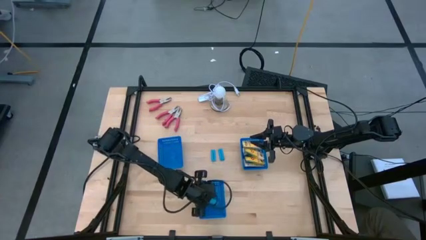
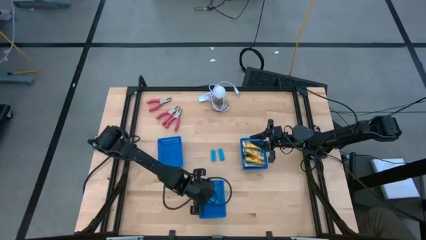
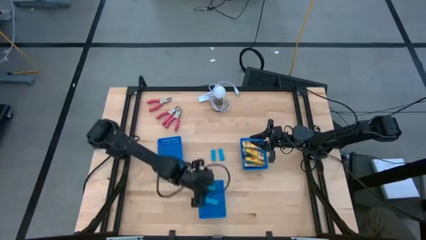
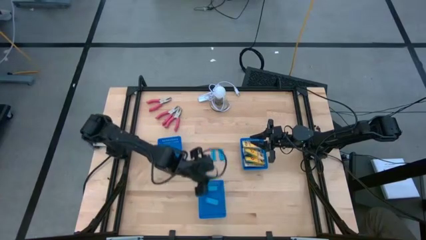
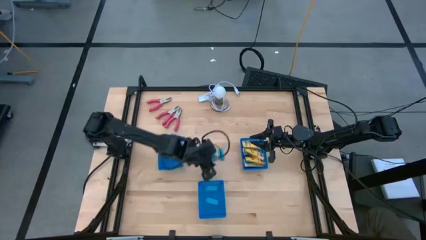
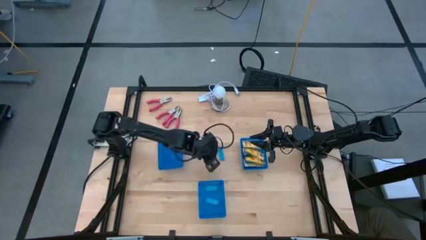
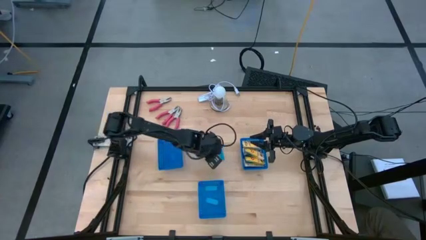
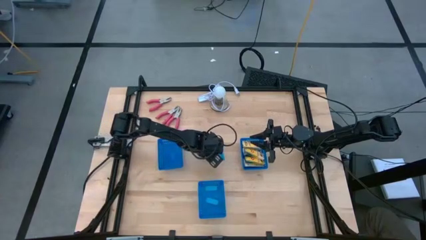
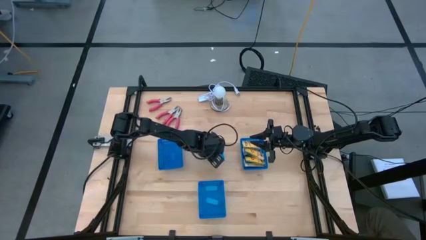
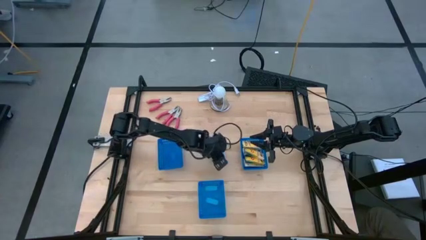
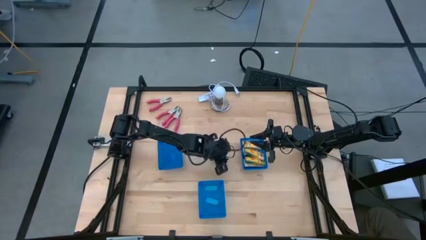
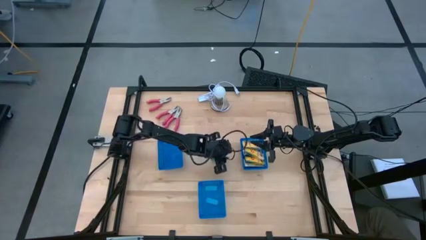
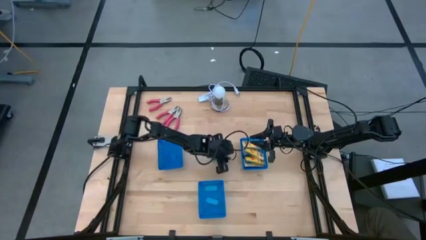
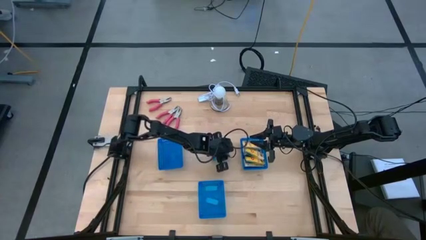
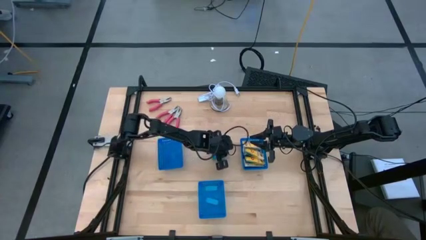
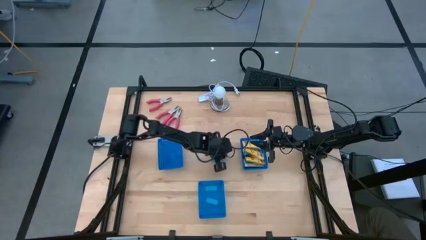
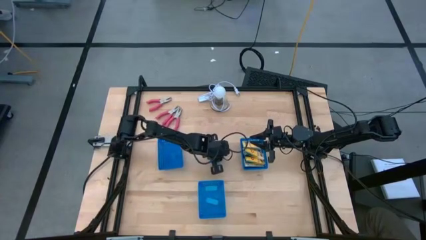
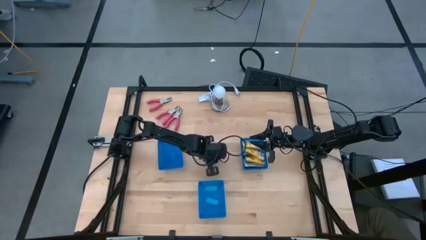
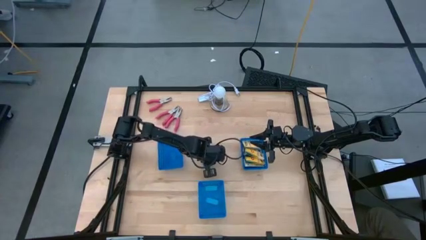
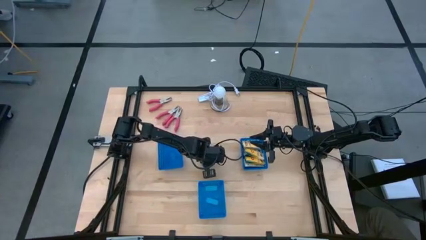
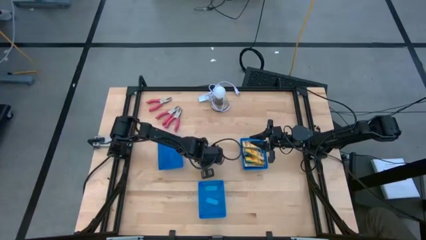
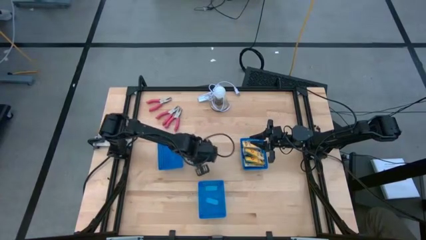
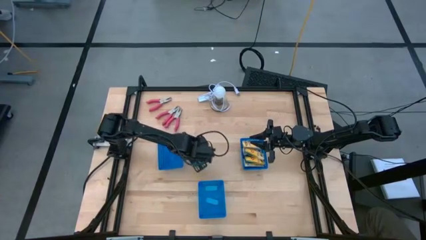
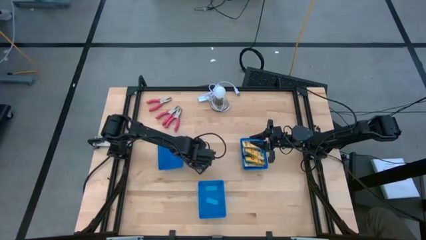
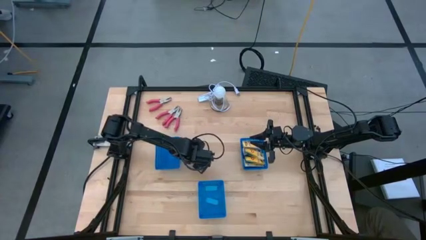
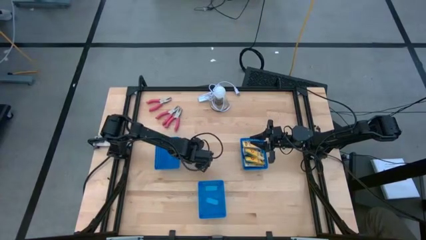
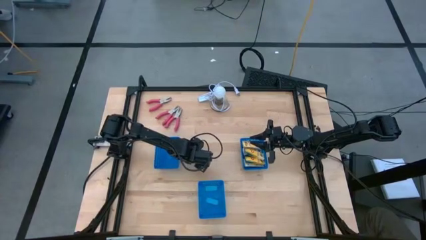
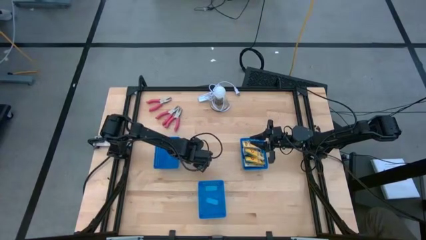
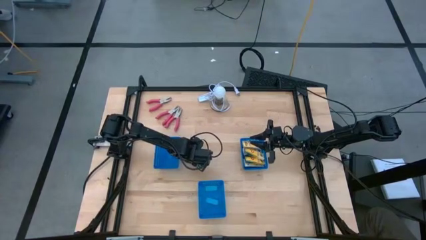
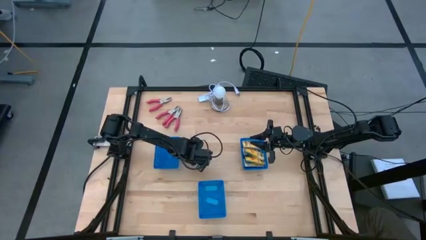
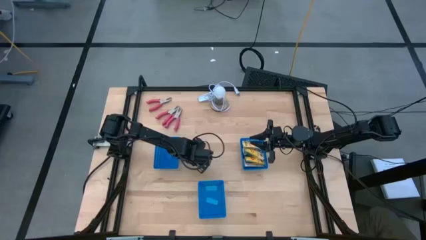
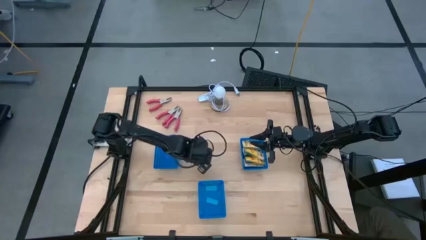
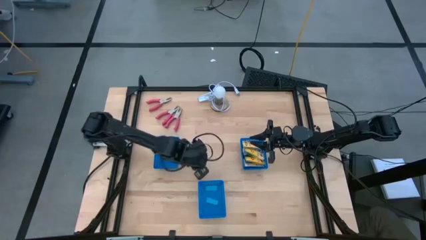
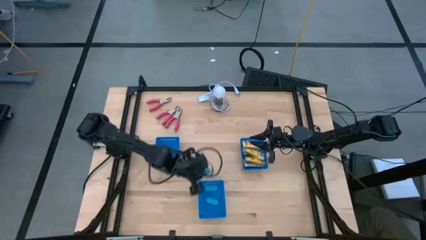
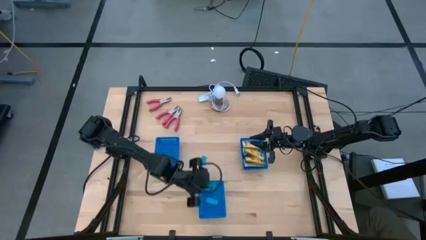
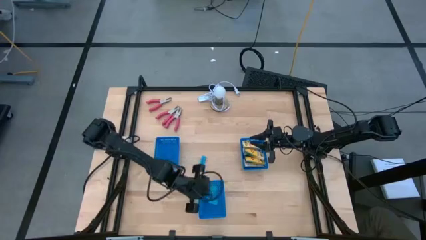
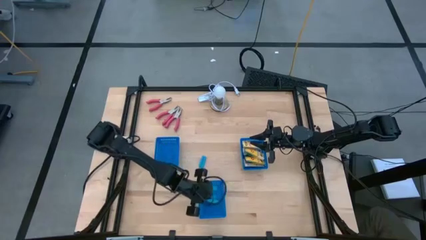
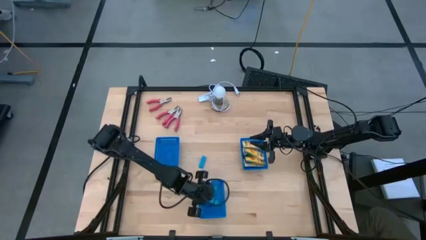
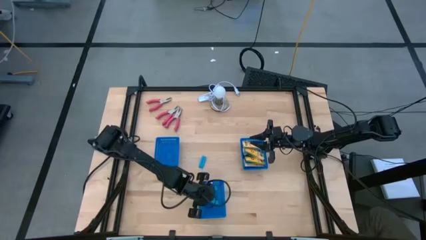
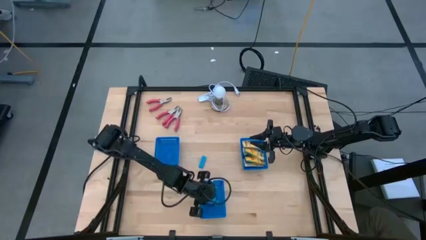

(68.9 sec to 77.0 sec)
Task: Pick & Place School Supplies
Put the blue eraser into the bottom blue bin

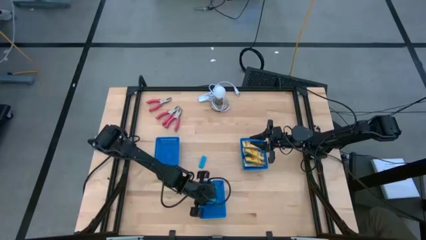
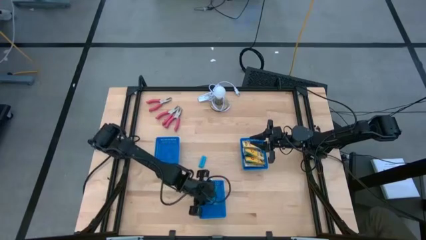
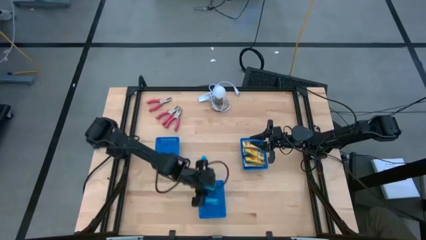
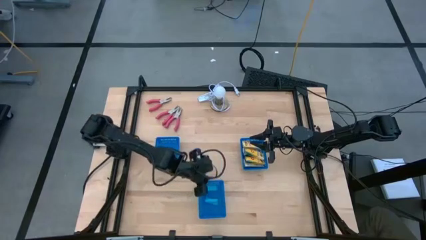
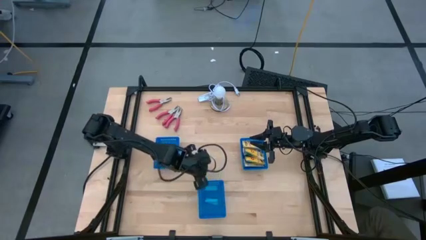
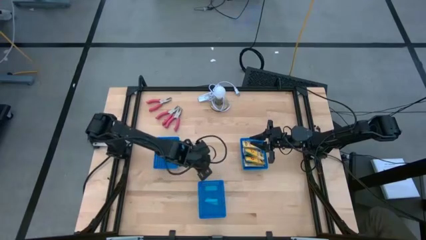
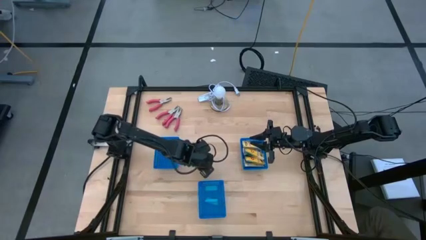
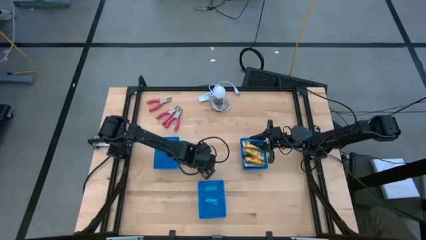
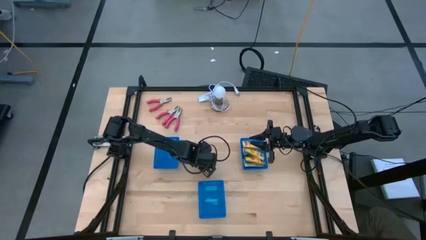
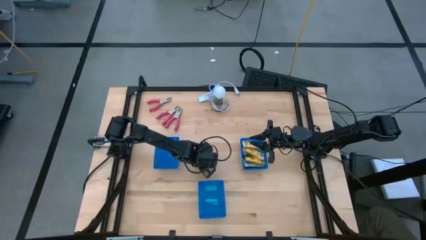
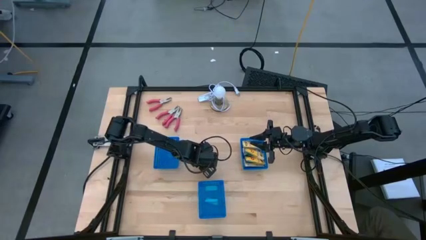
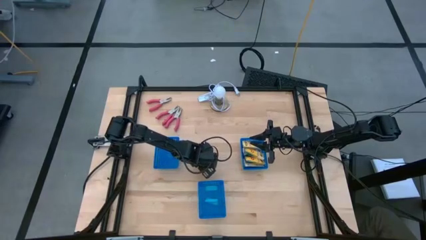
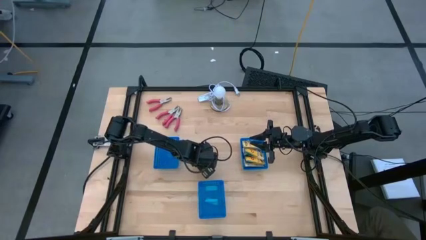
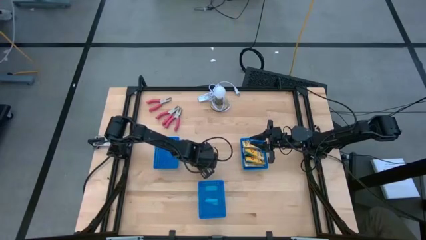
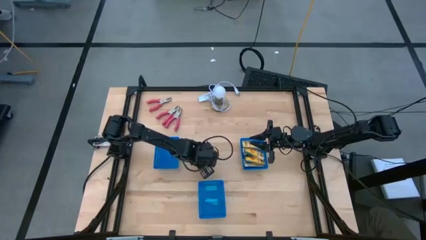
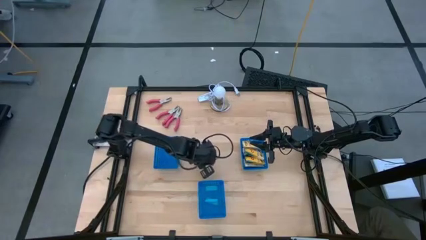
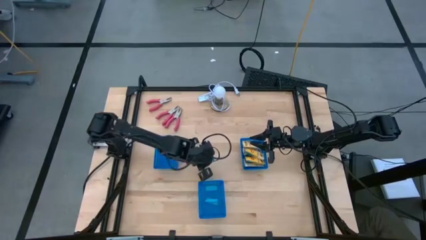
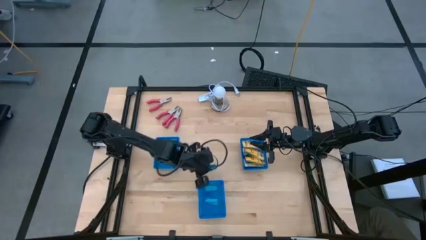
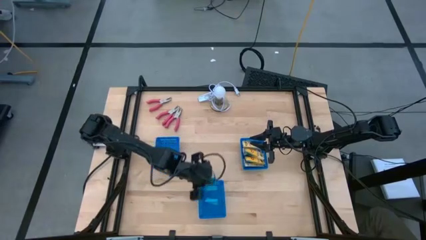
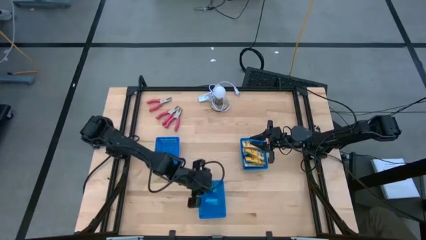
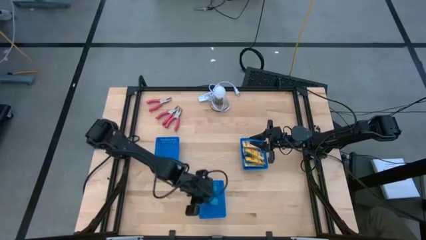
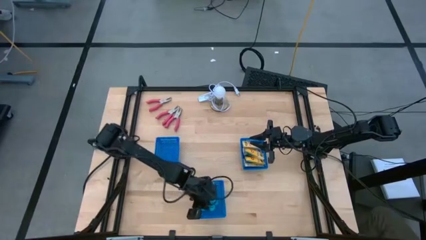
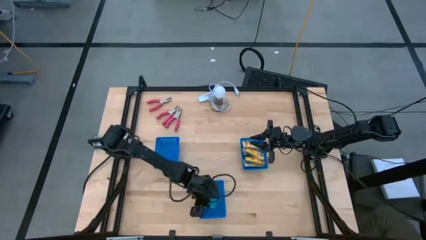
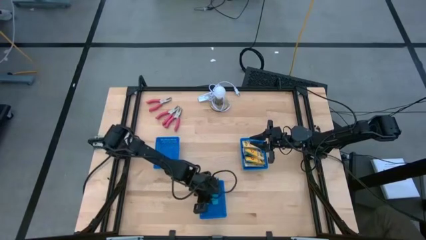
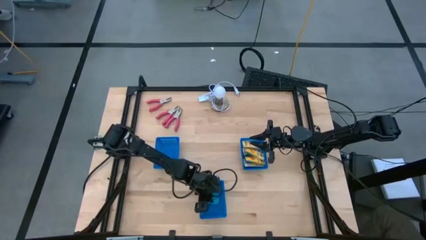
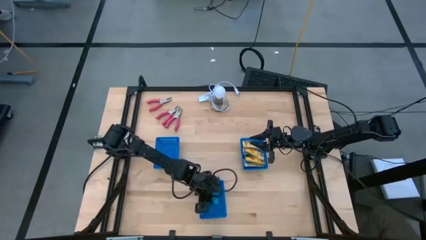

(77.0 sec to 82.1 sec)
Put the blue eraser into the bottom blue bin
